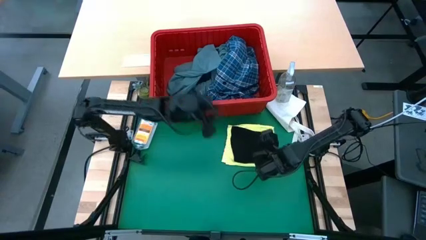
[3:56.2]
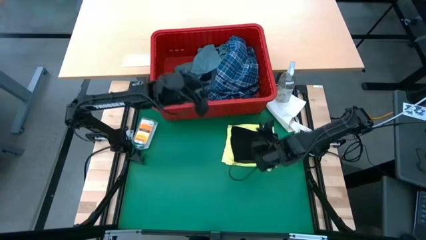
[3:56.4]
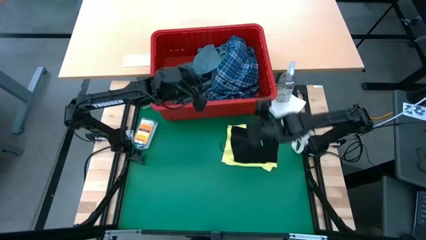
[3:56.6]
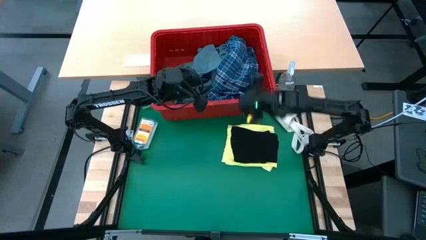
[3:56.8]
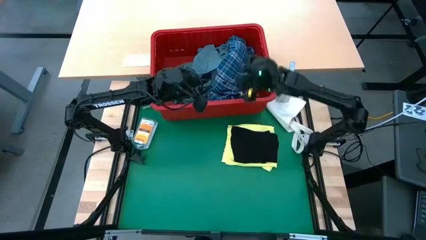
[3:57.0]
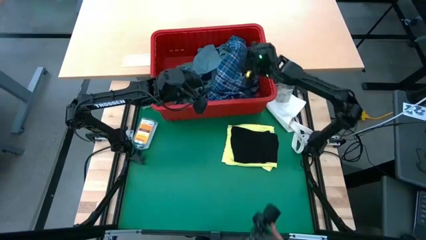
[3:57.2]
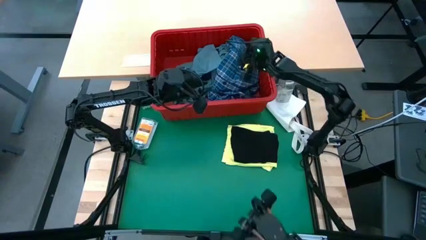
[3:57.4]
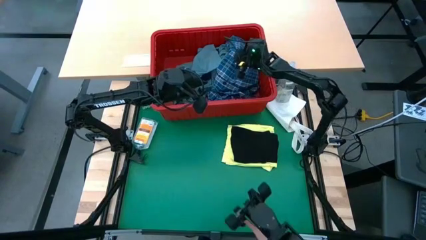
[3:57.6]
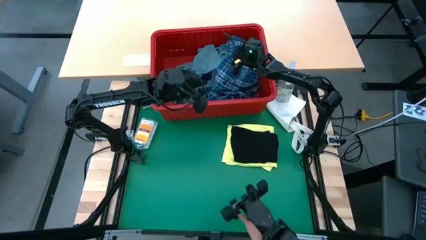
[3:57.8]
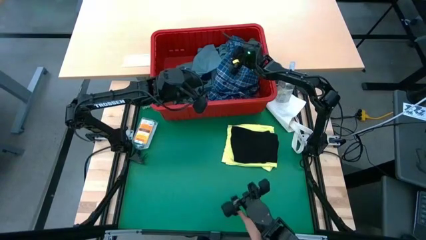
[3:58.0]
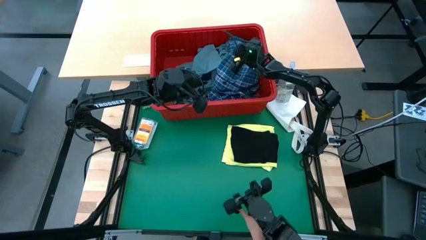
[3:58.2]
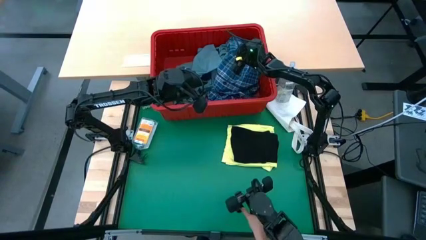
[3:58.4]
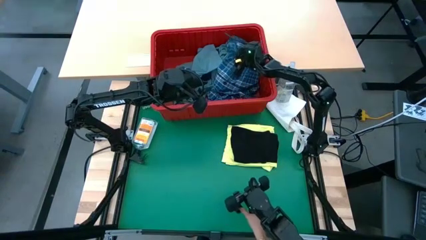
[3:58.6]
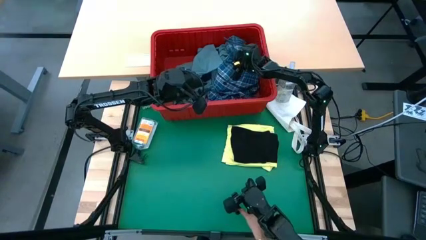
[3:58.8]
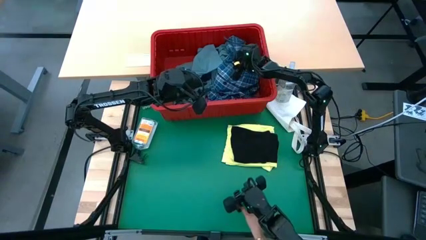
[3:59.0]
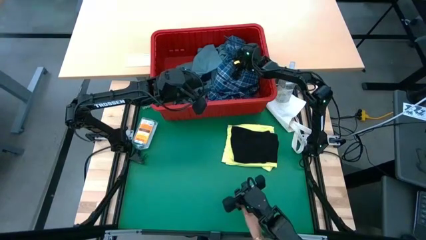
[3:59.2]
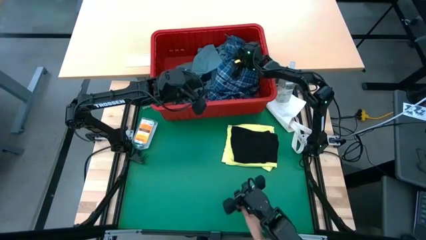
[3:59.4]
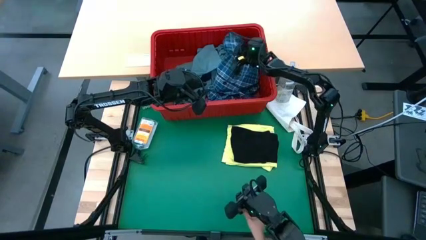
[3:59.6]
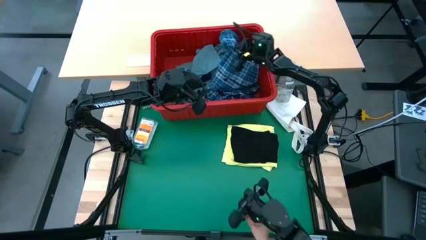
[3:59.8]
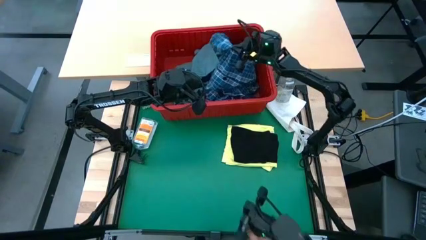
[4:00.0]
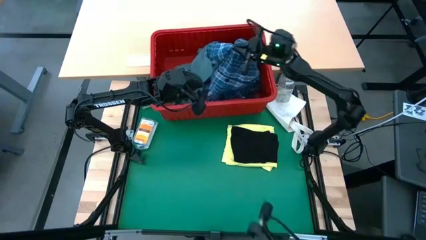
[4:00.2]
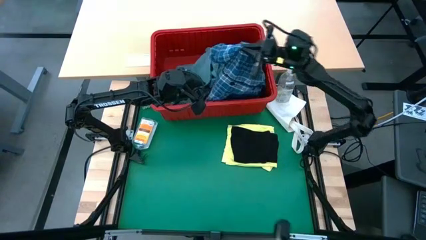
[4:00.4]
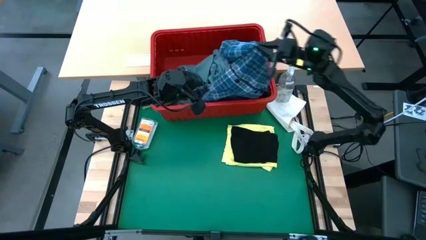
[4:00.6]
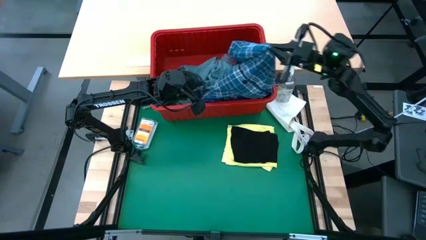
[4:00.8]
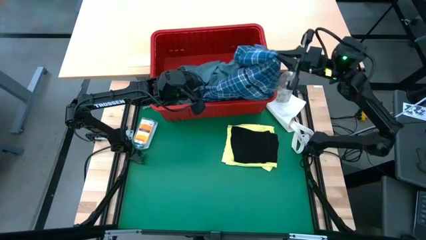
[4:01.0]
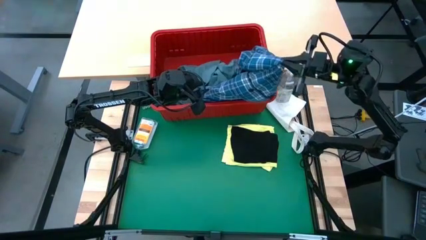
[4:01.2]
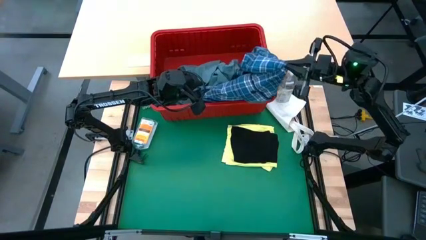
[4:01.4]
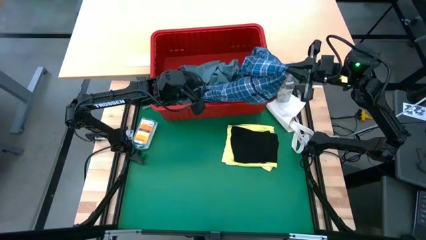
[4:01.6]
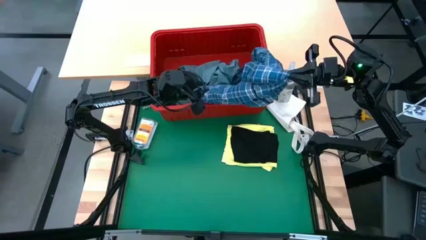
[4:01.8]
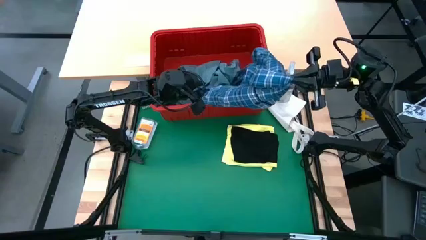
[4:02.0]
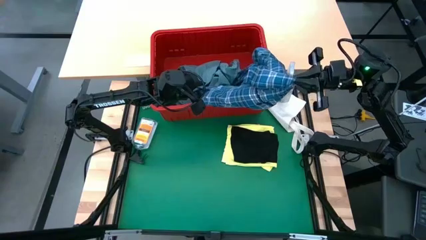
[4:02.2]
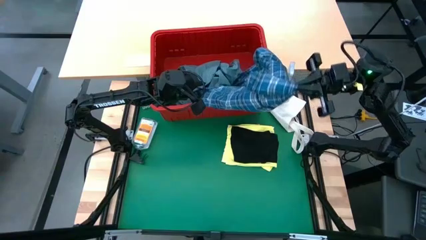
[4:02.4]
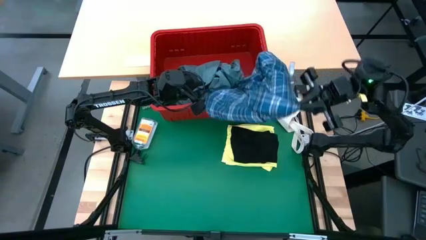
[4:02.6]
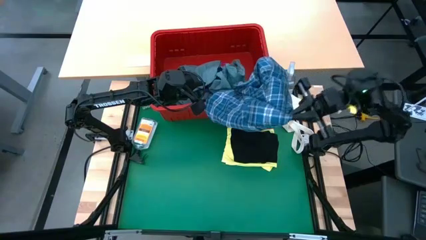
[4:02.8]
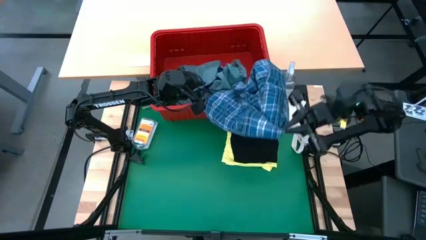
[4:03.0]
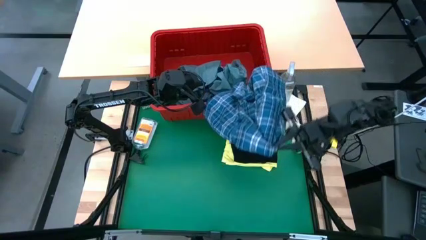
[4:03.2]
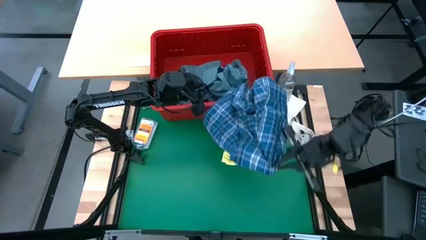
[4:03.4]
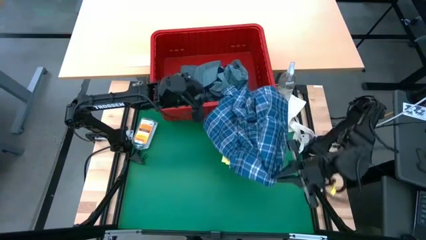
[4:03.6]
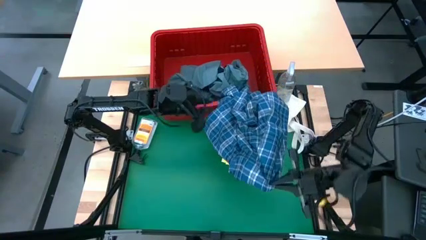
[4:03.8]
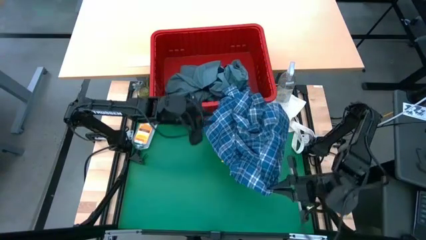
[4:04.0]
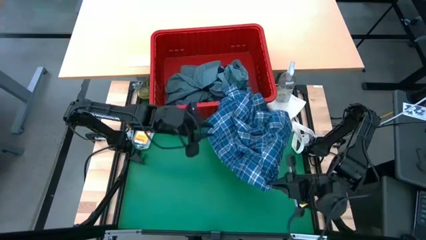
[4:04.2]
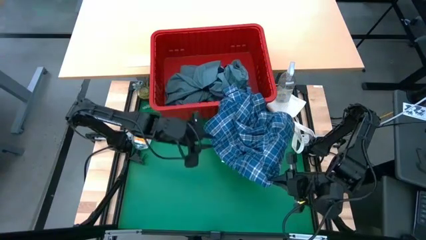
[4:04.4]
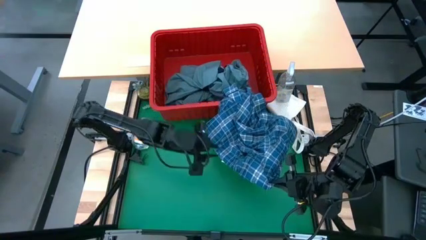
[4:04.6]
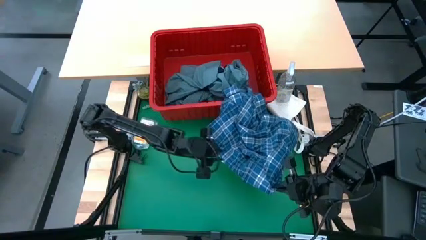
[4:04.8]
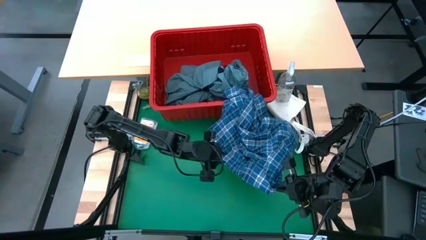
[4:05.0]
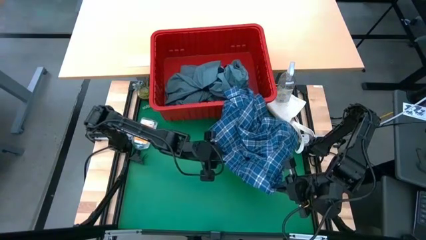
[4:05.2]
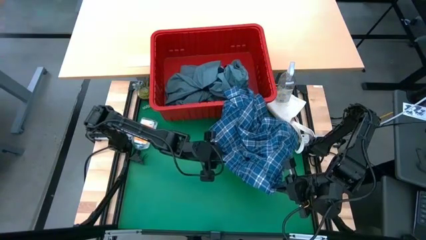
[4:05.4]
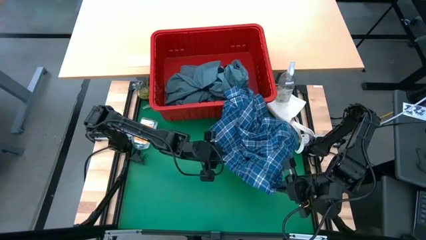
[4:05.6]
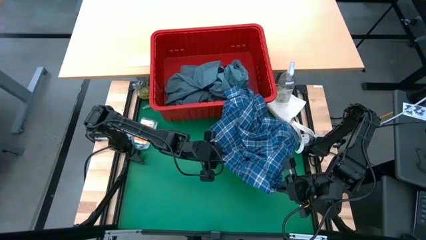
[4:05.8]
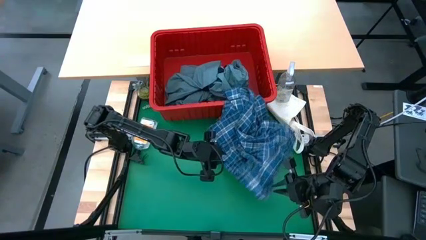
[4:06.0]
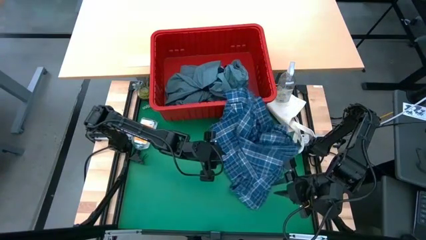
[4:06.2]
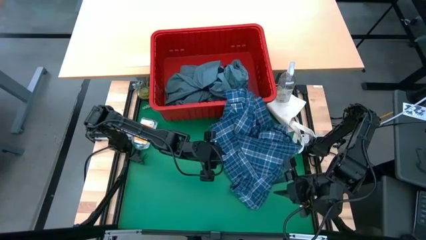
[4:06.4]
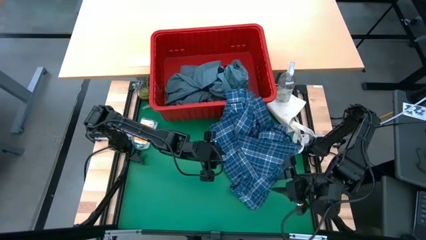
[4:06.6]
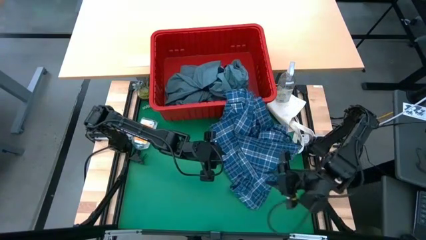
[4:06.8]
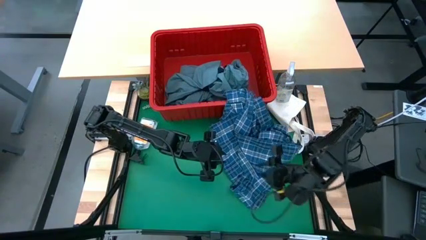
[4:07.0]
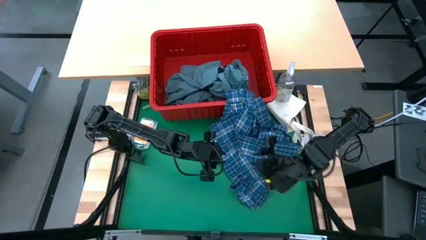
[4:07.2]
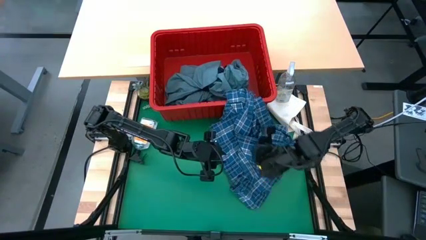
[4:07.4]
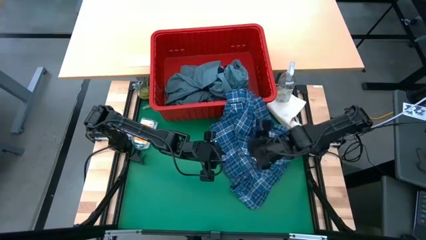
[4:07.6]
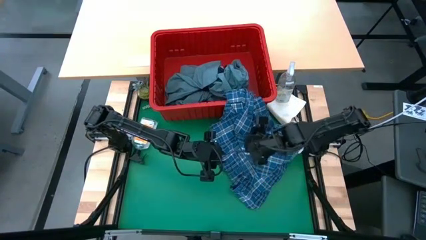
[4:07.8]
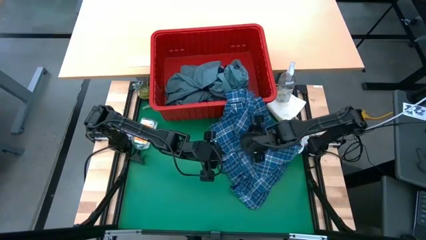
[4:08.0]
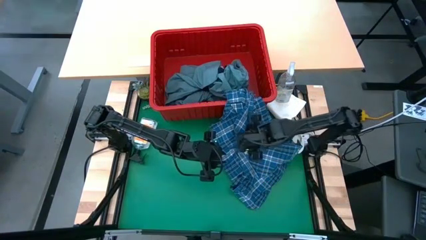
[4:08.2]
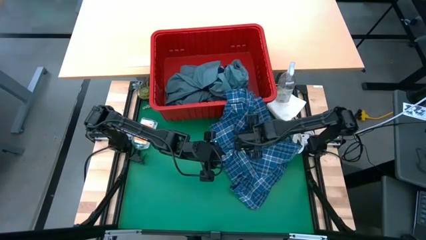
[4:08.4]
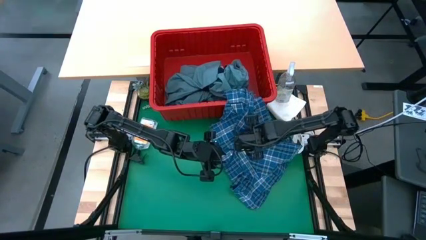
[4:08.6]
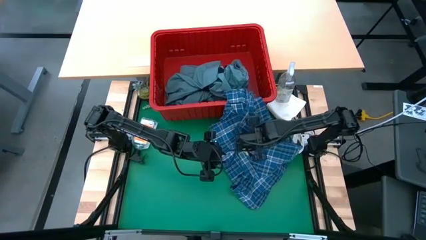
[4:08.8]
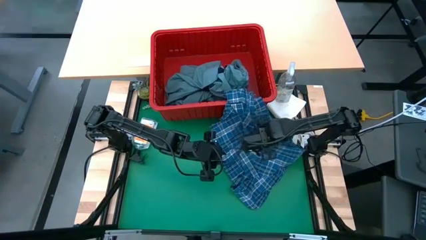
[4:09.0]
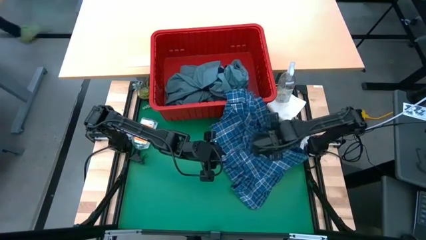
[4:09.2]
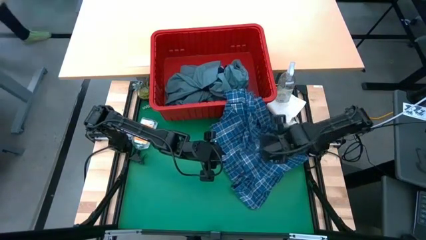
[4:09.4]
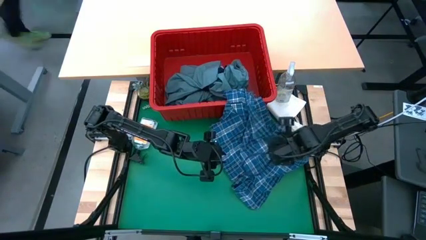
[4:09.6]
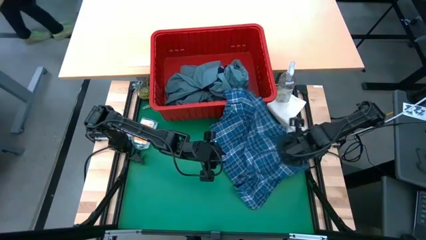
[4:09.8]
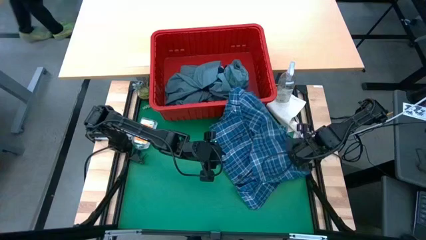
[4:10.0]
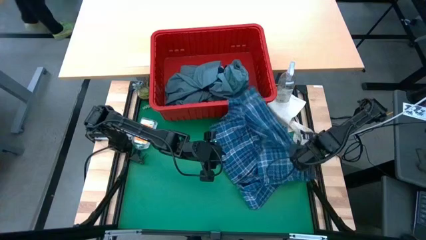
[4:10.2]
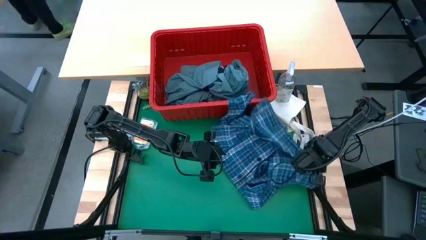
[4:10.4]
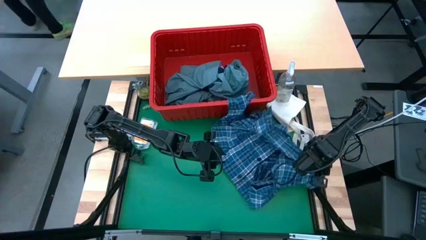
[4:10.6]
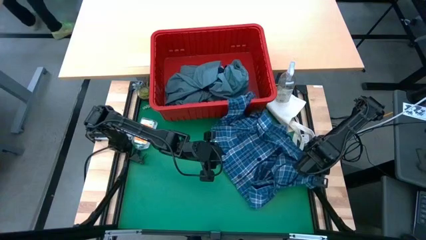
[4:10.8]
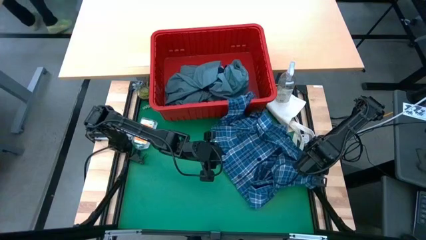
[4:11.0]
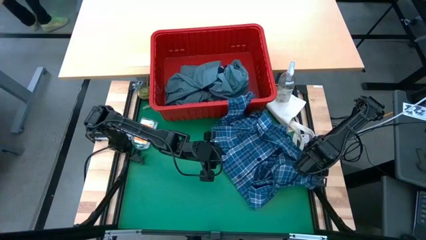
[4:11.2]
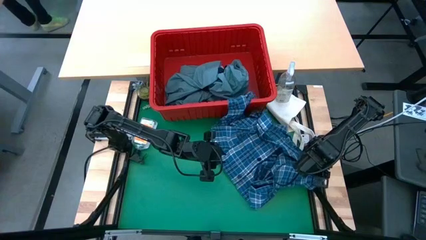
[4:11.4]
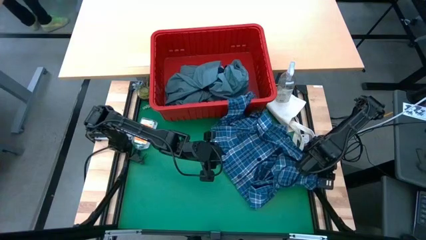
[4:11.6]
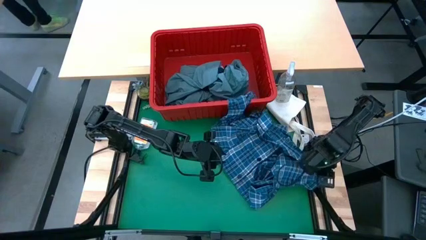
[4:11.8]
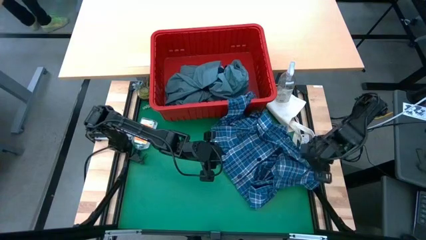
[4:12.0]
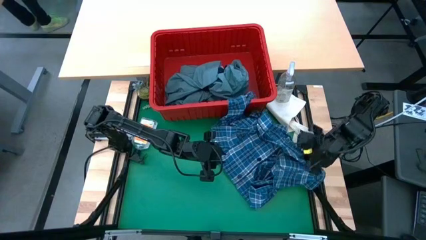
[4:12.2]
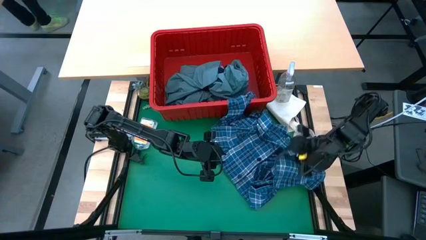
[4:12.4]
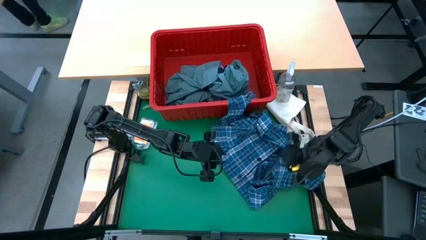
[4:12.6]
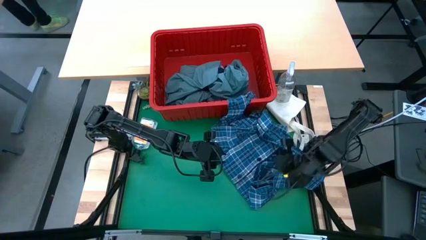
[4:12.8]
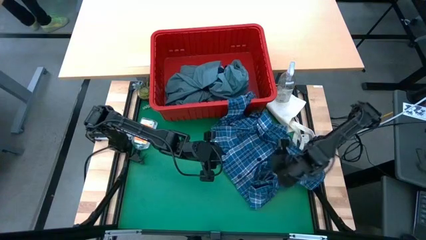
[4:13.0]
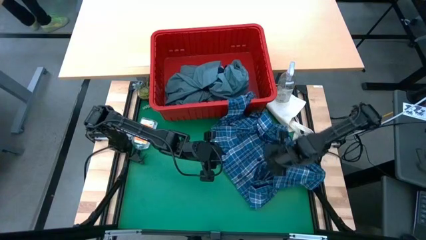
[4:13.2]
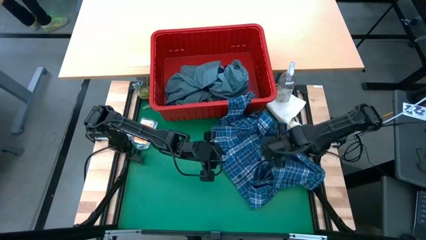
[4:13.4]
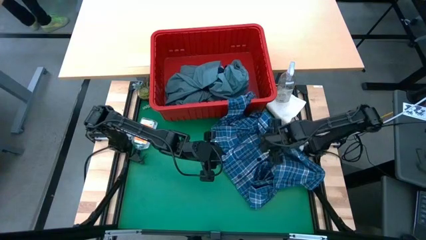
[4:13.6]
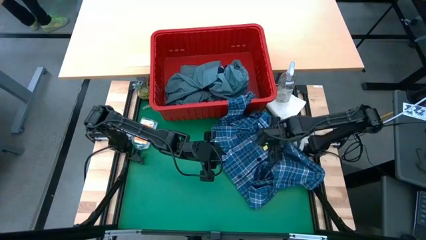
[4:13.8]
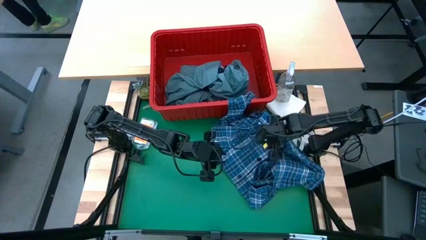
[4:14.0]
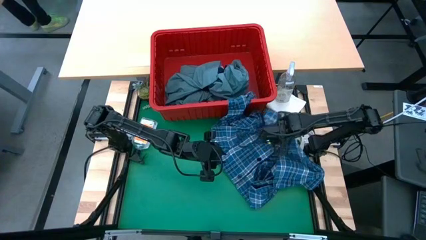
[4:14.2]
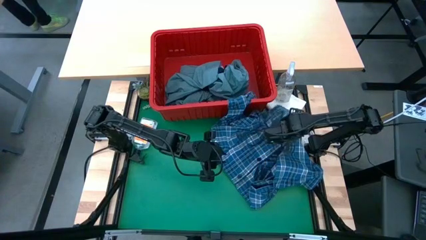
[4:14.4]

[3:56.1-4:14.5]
Task: Fold Laundry from Bin
Fold the blue shirt
